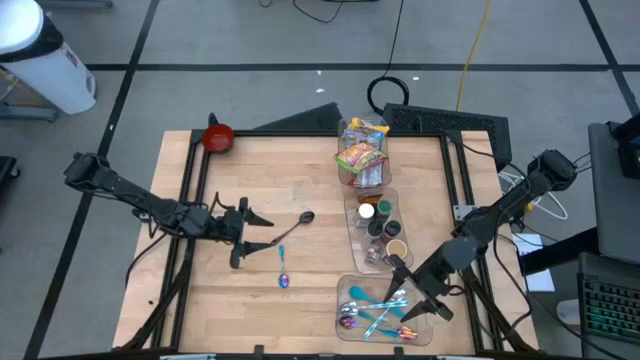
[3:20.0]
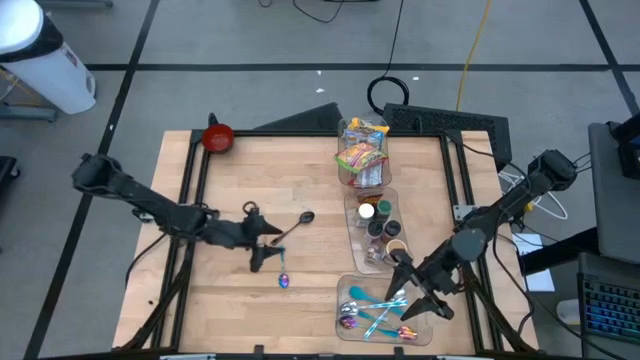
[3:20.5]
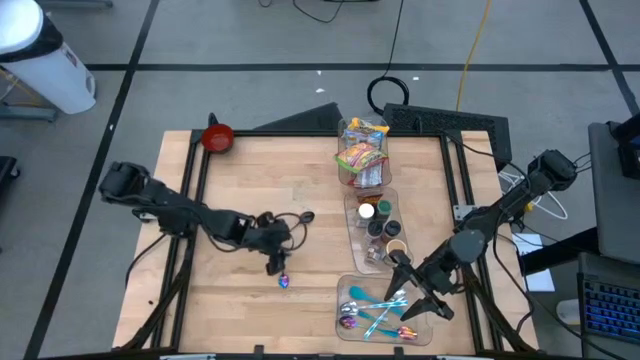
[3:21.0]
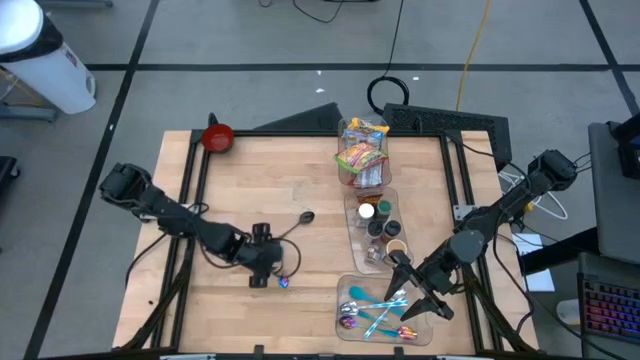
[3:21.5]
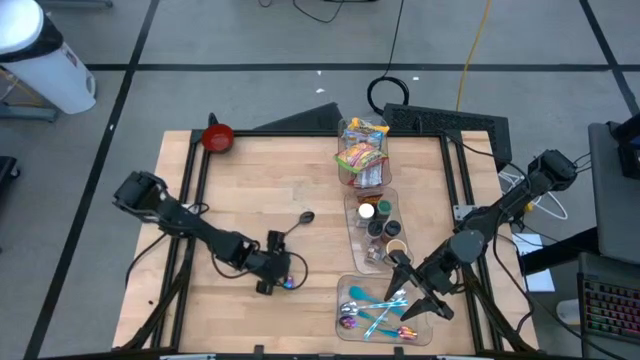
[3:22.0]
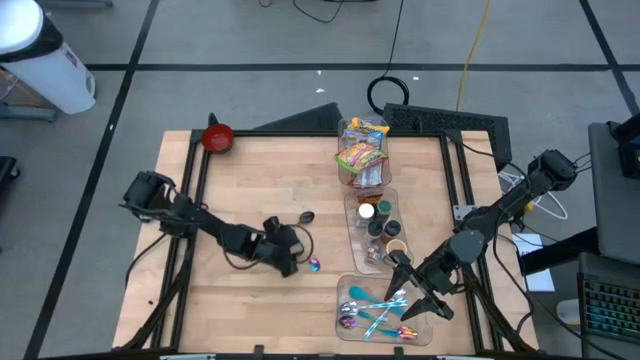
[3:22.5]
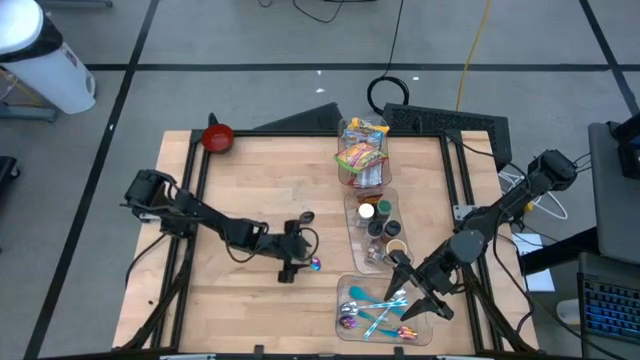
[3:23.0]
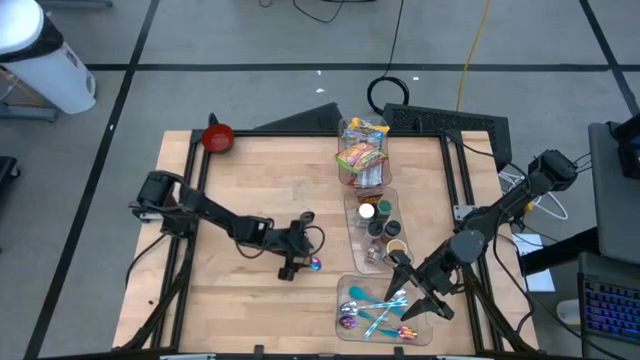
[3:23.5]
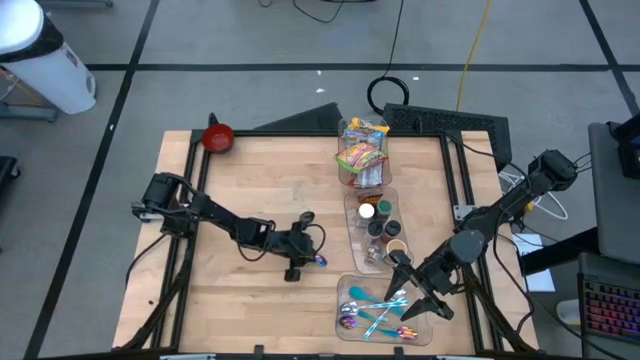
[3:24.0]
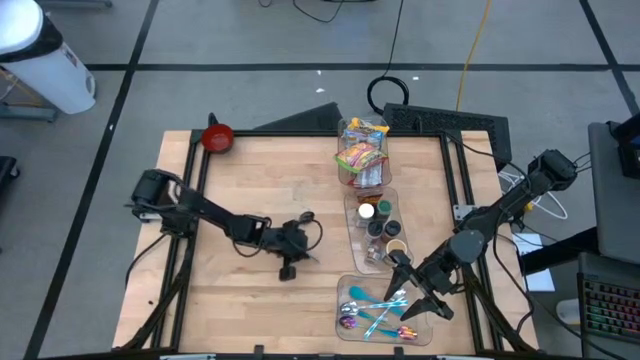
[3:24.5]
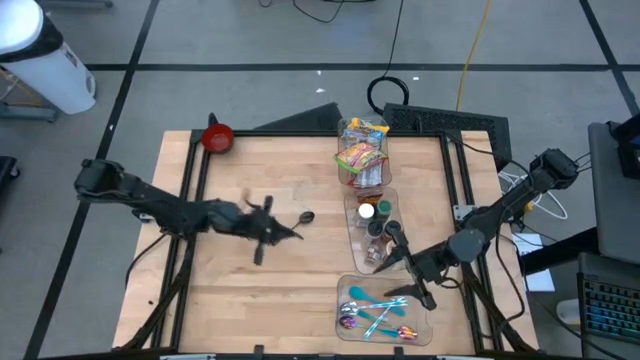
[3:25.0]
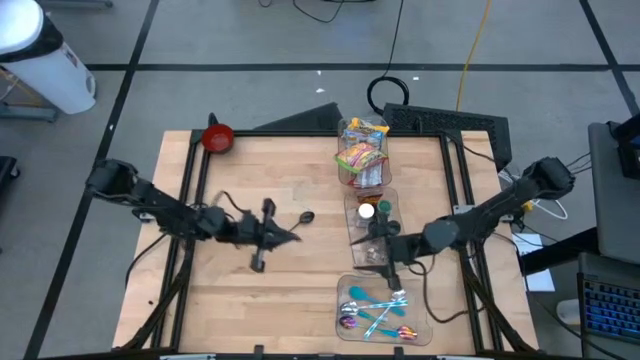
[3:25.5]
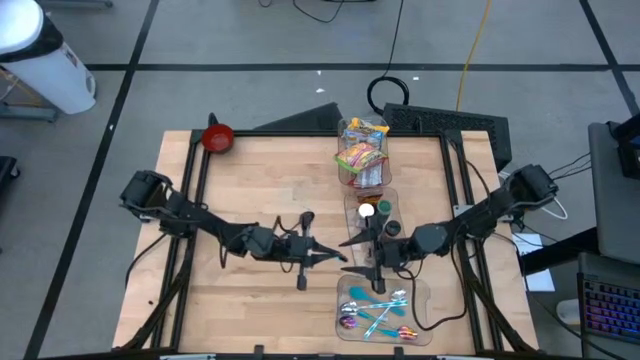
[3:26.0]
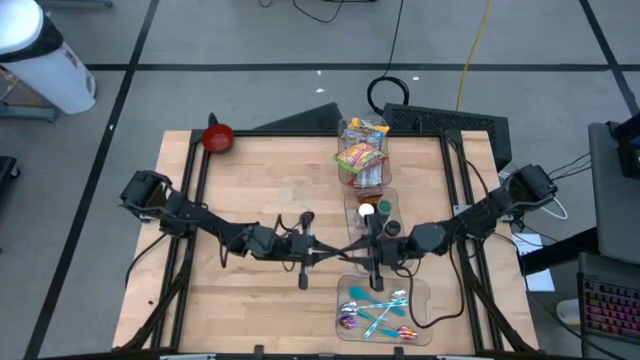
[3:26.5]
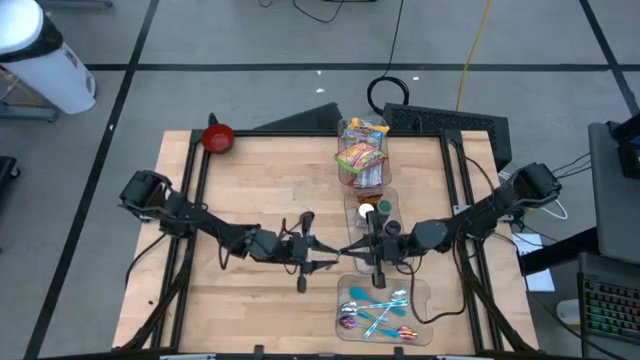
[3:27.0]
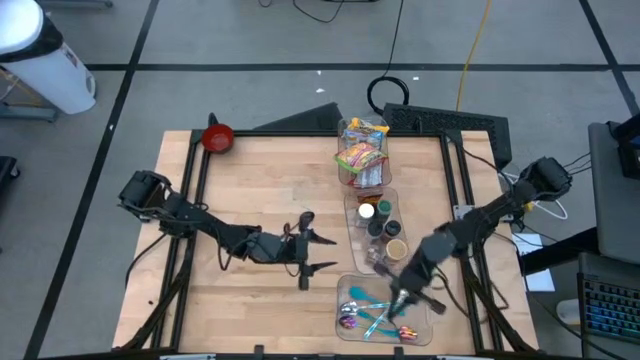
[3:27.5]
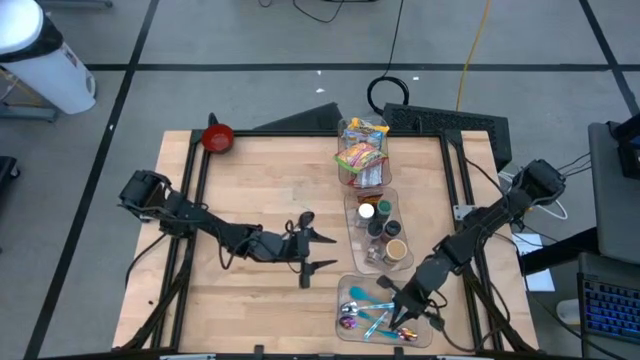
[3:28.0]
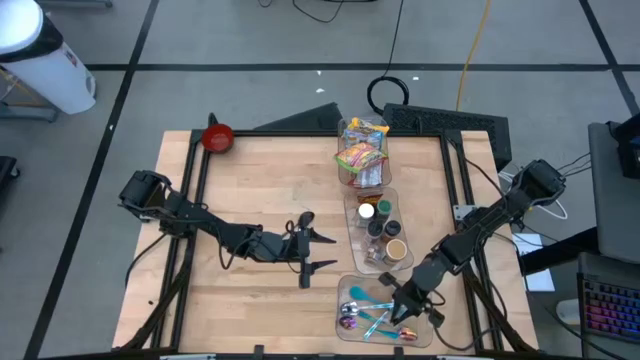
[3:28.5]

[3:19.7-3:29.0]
Task: Pick & Place Food Item
Put the purple spoon into the bottom transparent bin

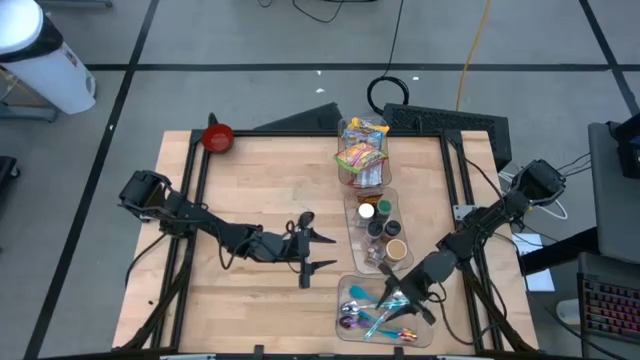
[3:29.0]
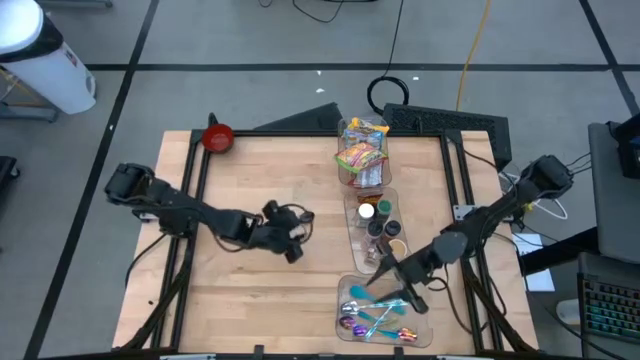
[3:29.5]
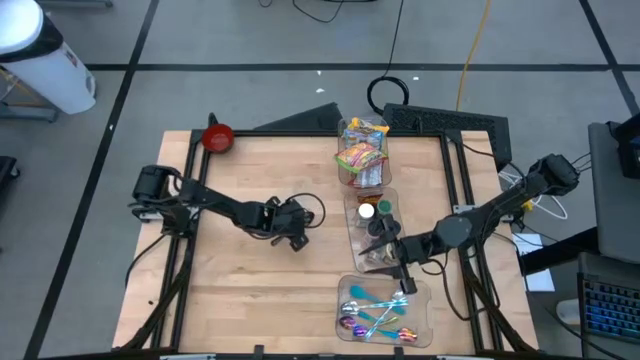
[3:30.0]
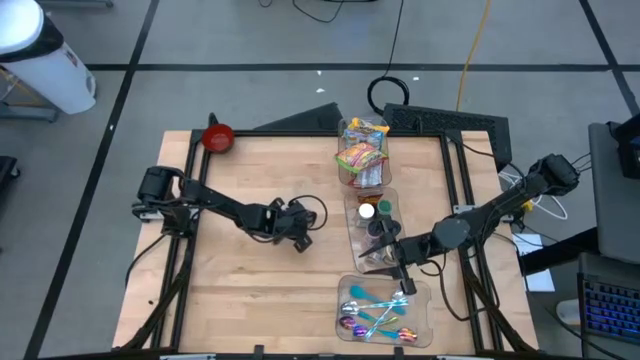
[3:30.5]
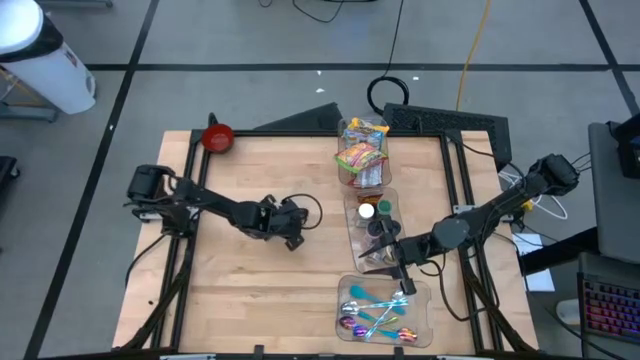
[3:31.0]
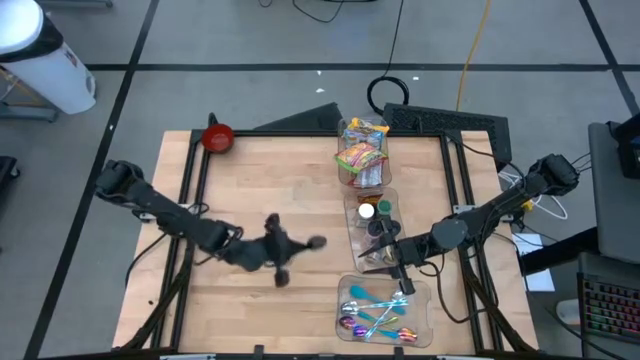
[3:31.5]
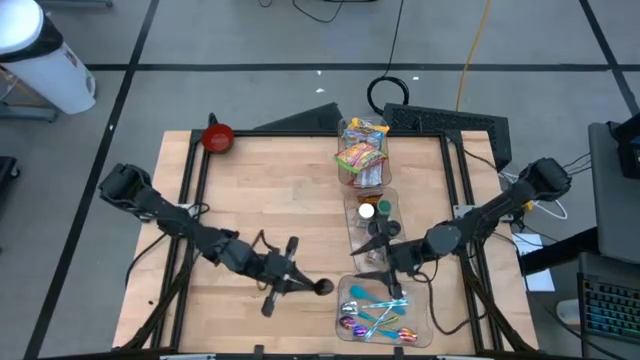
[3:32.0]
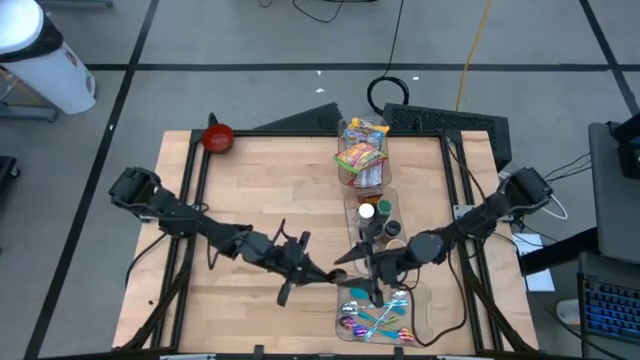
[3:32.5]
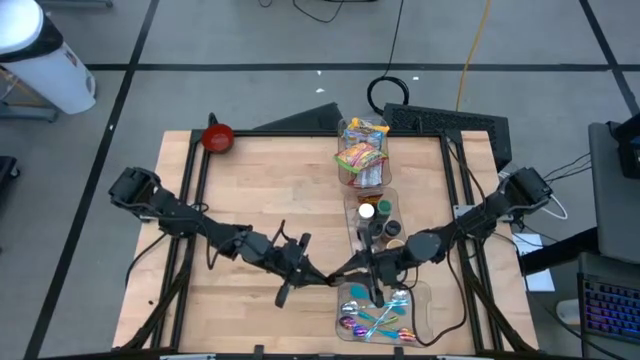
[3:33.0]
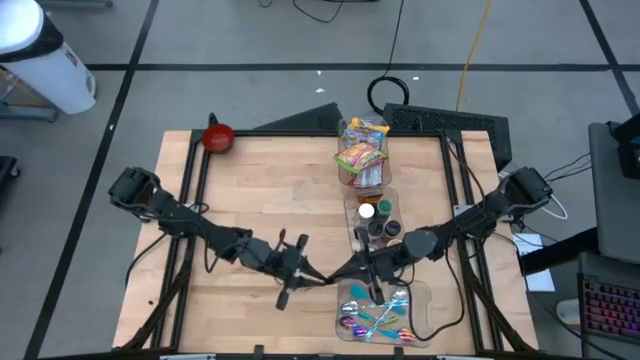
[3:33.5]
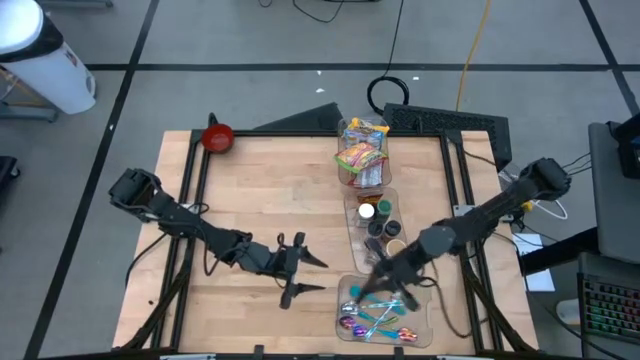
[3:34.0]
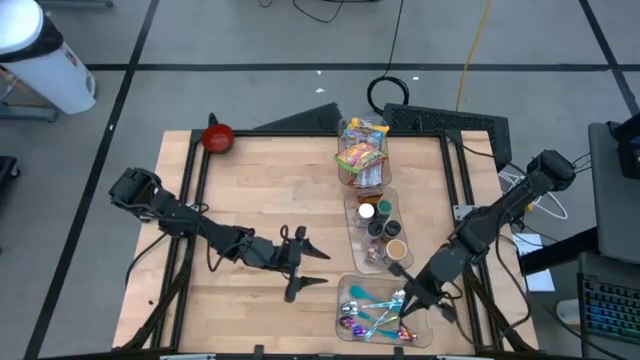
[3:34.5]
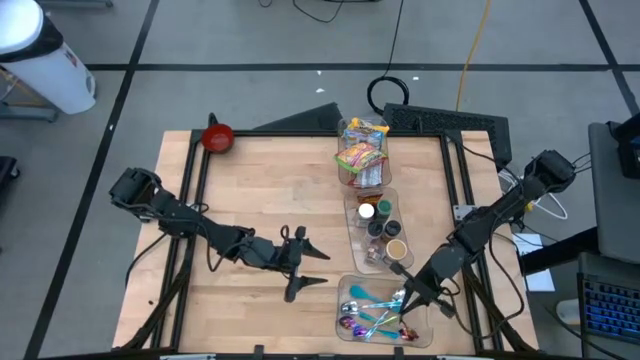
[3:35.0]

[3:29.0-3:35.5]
Put the black spoon into the bottom transparent bin

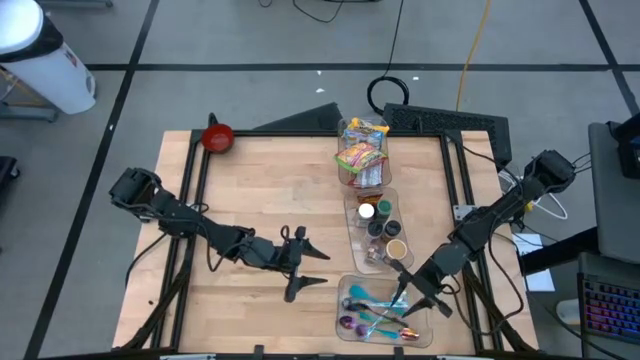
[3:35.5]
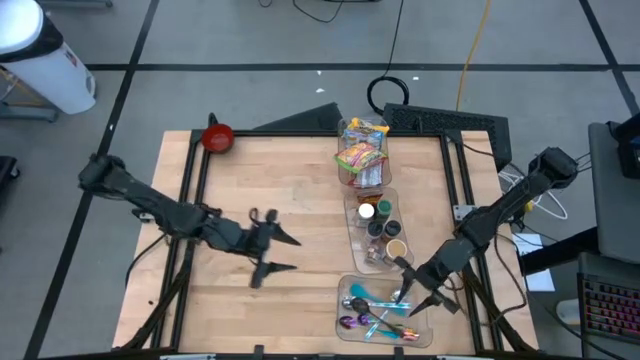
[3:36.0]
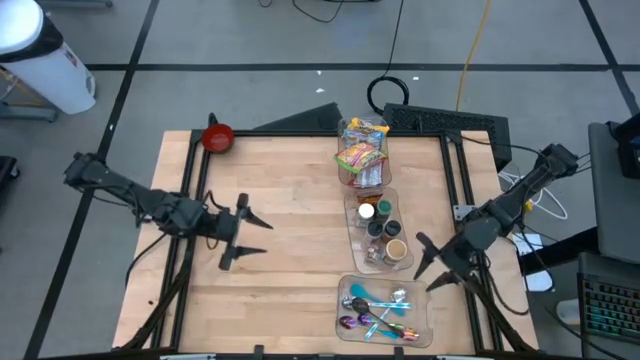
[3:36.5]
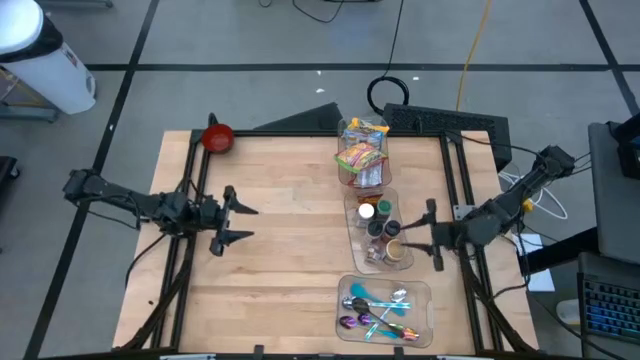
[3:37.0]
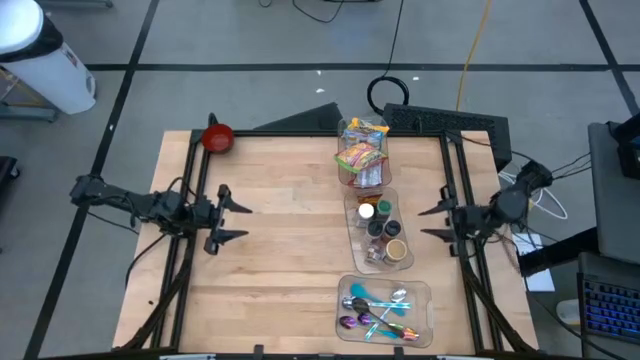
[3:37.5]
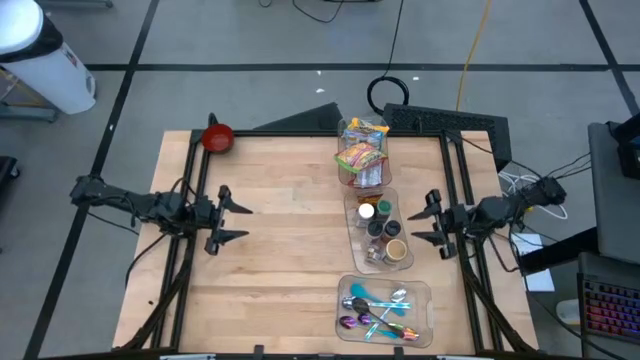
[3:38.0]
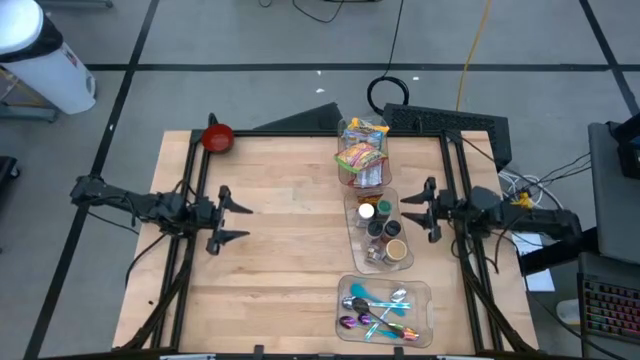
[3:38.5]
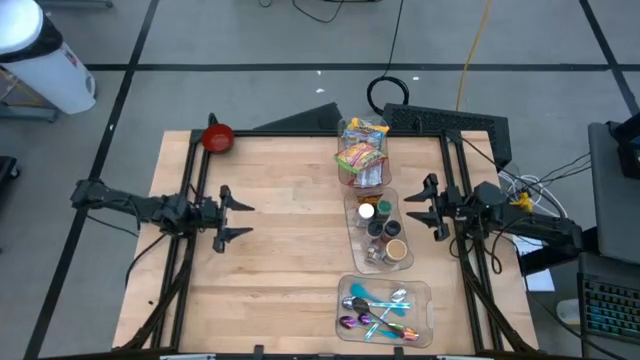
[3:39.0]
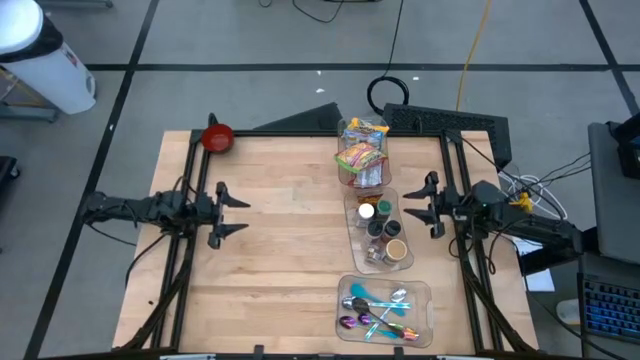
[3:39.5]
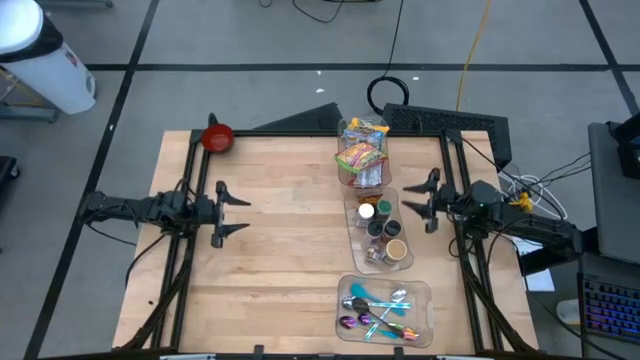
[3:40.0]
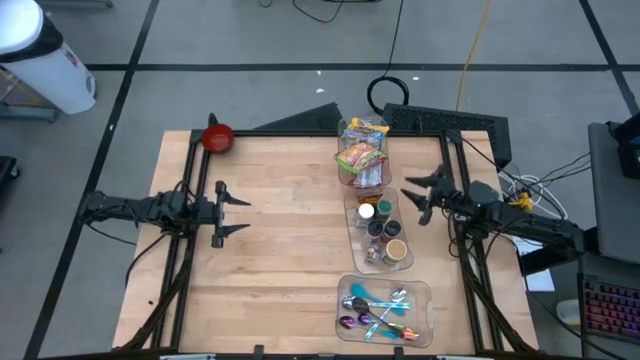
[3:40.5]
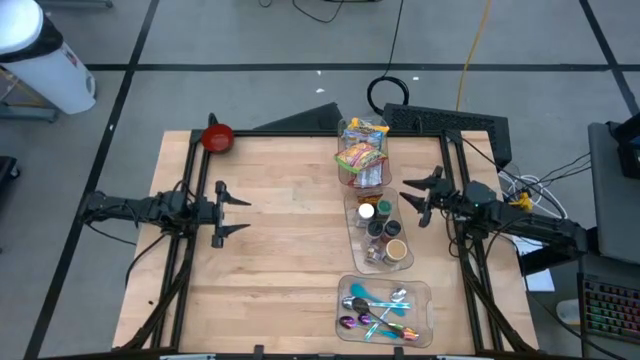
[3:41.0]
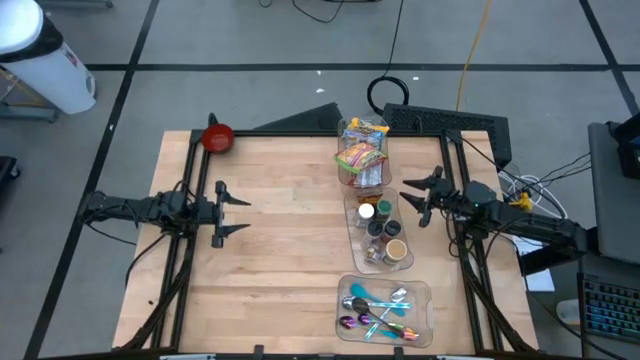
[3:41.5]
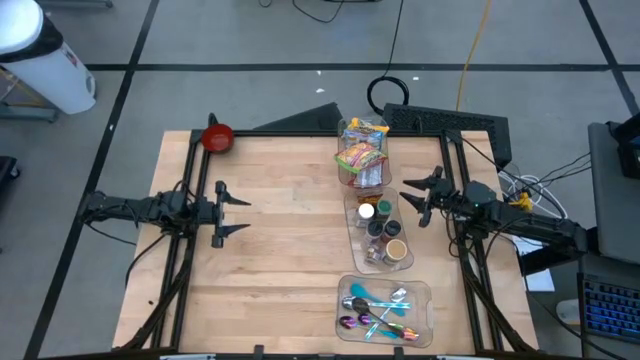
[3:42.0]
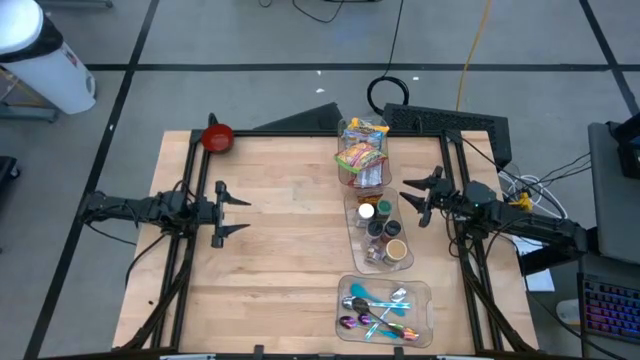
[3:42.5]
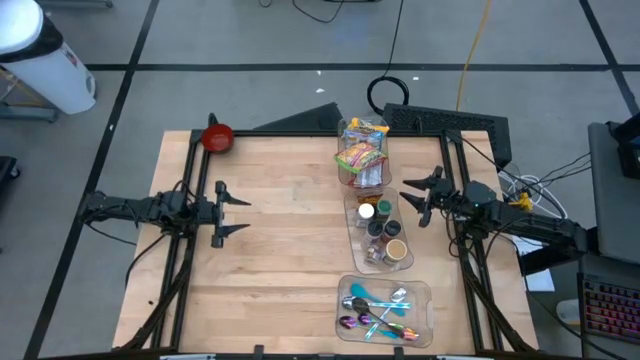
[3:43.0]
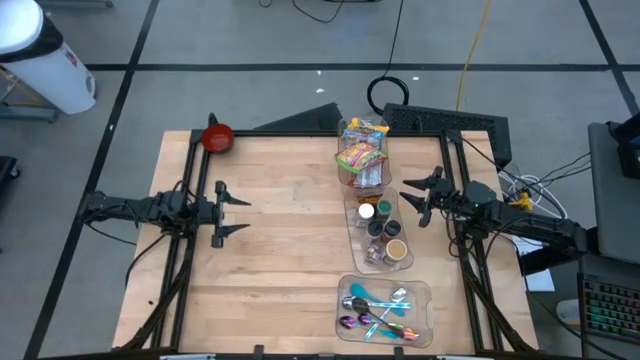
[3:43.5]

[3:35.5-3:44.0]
Return to Home Position
